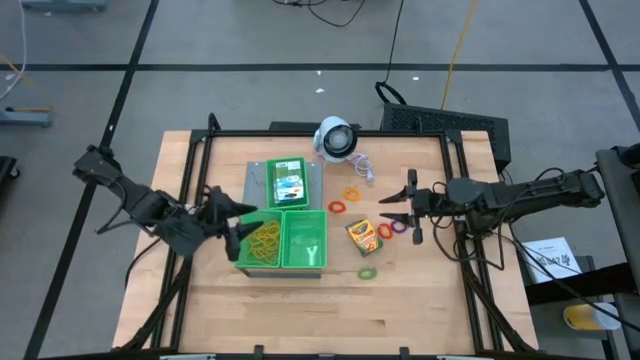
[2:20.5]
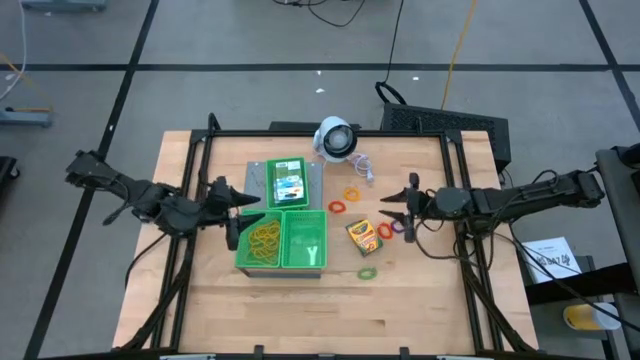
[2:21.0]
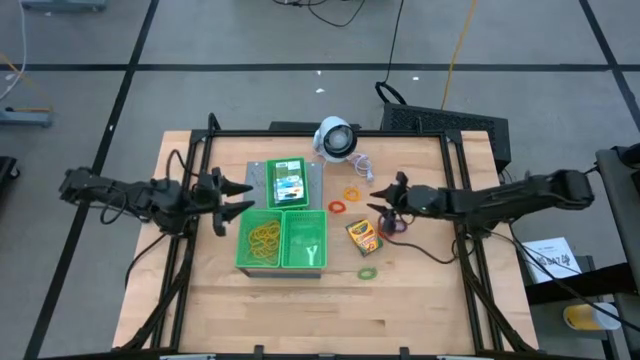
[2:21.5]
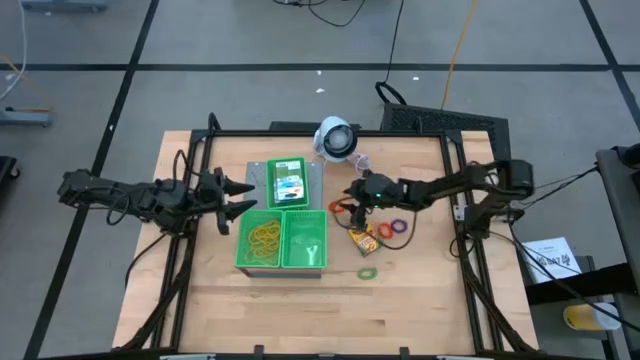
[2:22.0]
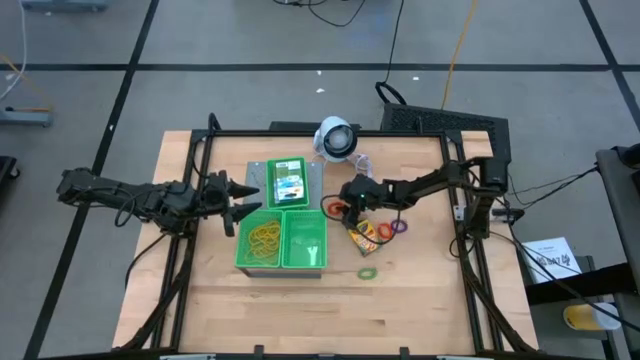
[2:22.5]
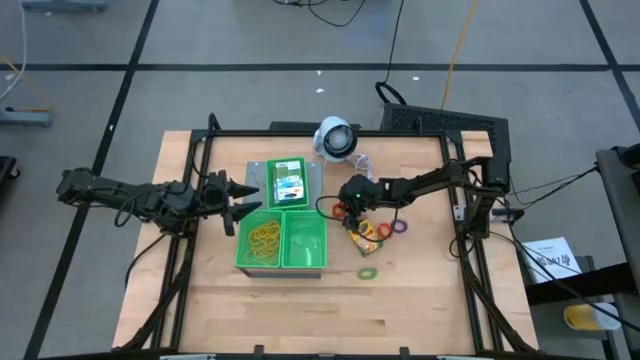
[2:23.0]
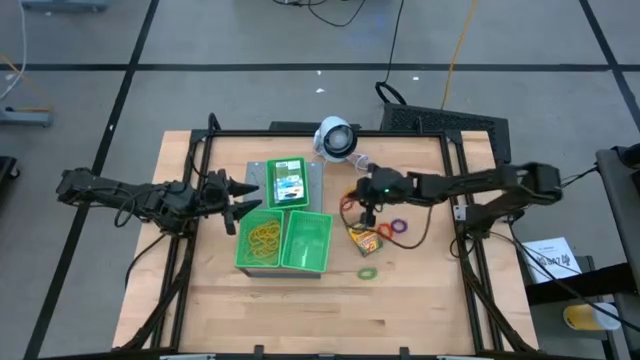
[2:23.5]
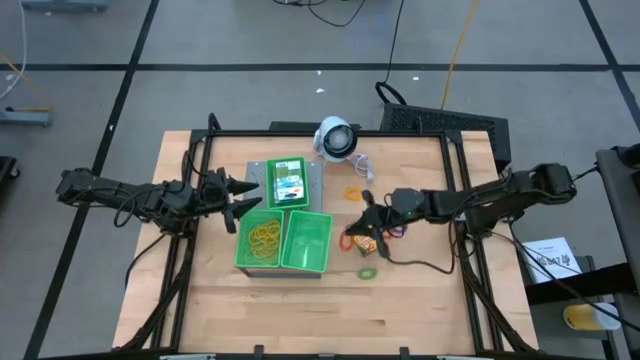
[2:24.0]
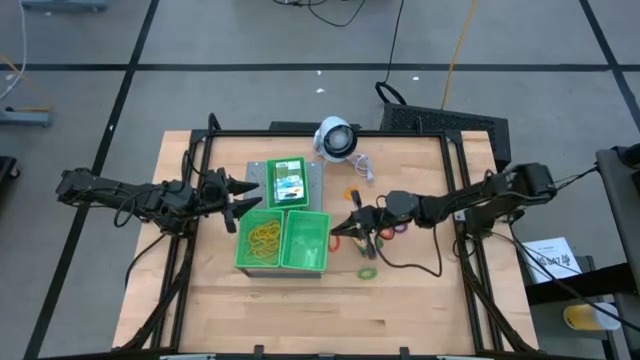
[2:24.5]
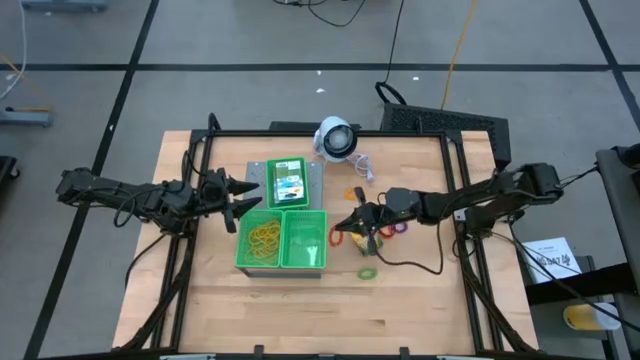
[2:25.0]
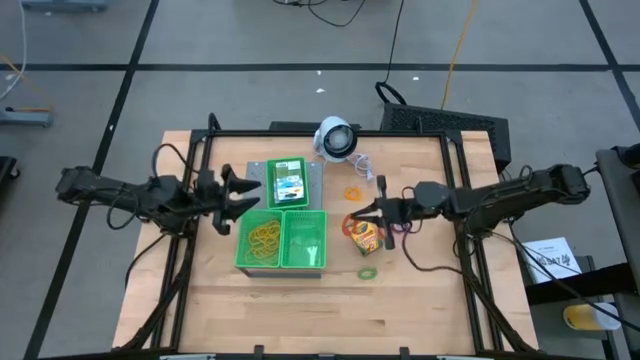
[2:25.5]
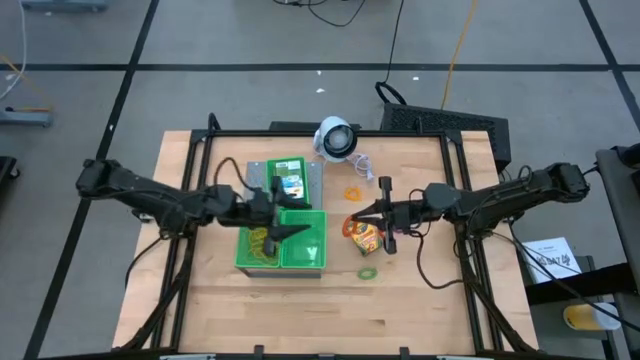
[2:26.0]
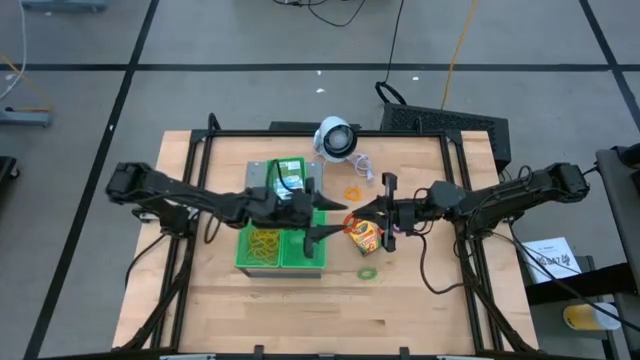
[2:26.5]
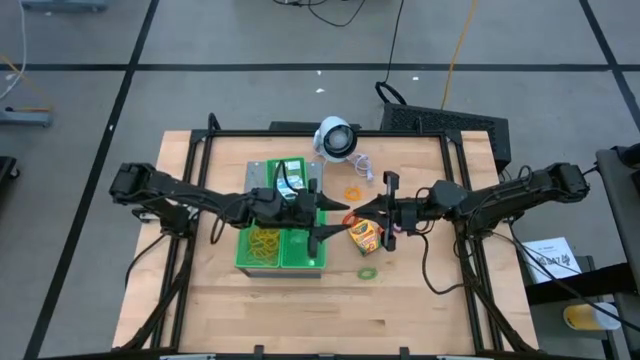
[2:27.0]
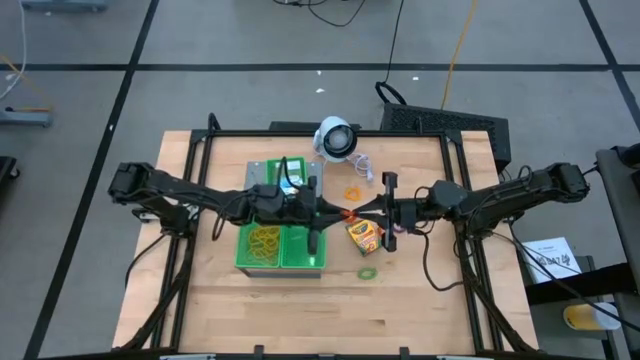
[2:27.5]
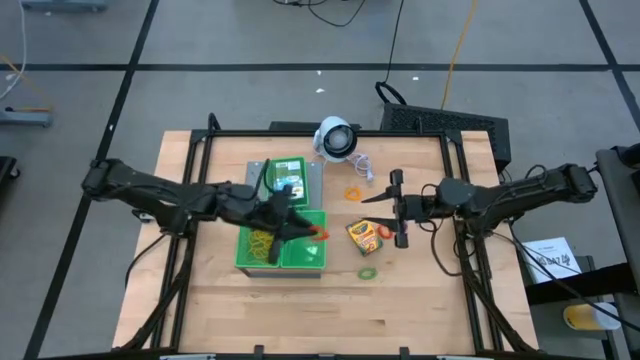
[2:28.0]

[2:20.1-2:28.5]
Task: Pick & Place Office Desk Supplies
Put the orange spring keychain into the bottom right basket on the shelf

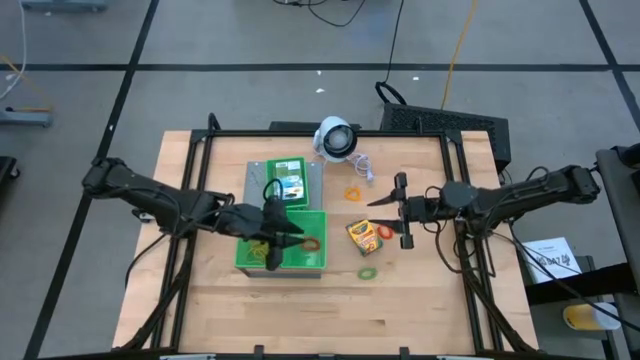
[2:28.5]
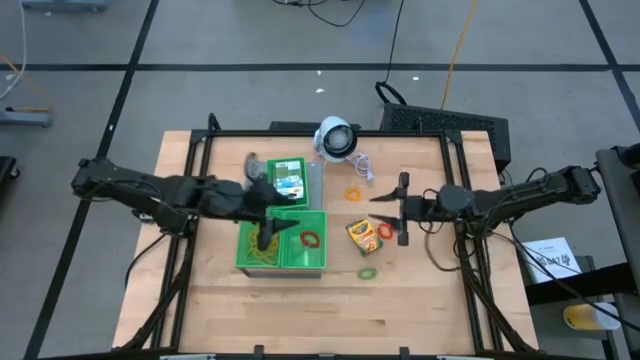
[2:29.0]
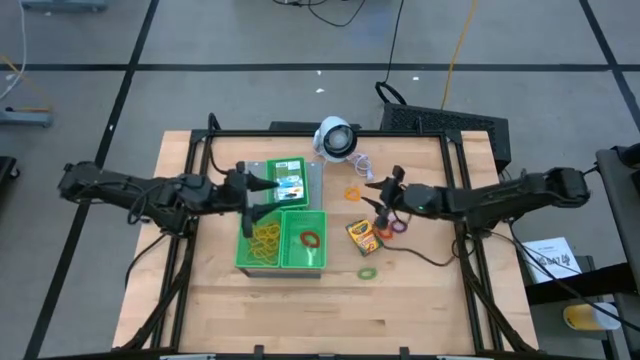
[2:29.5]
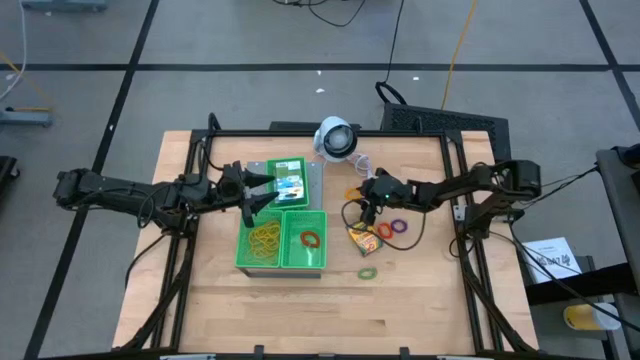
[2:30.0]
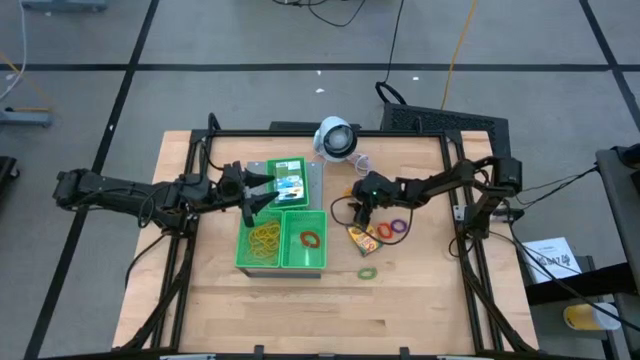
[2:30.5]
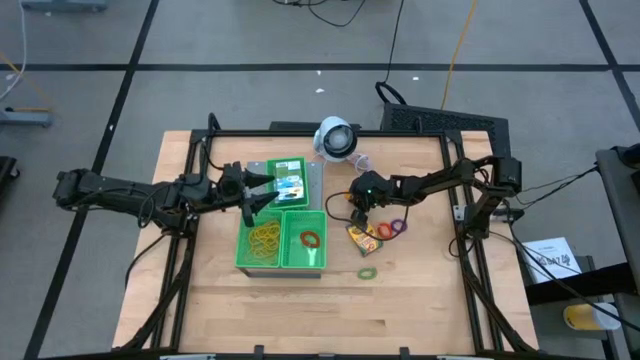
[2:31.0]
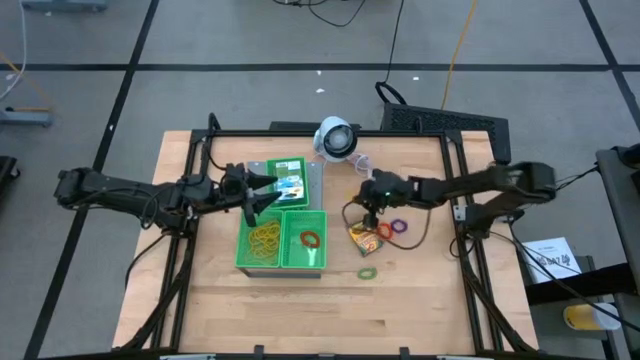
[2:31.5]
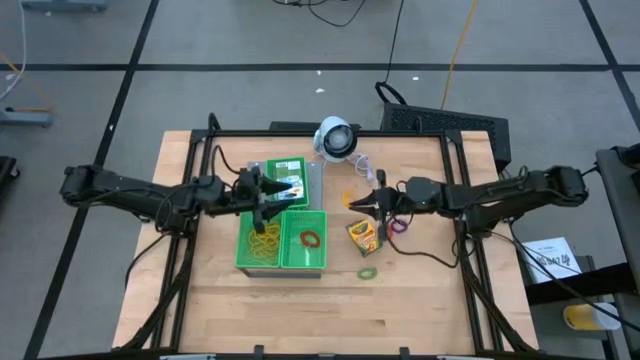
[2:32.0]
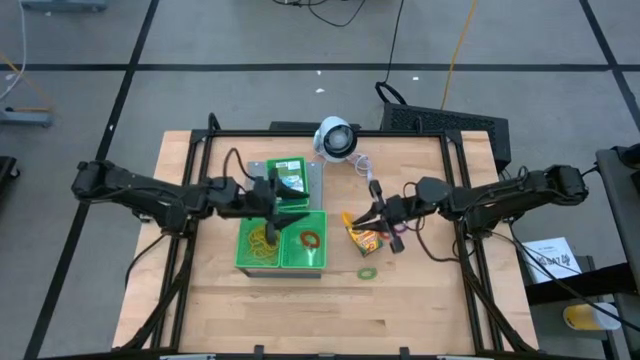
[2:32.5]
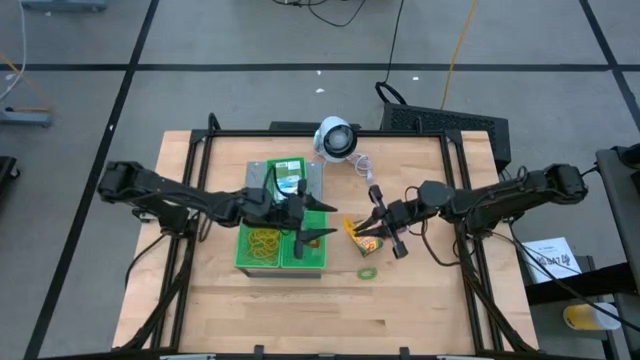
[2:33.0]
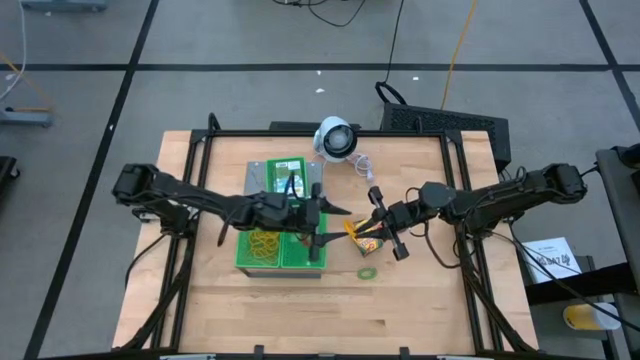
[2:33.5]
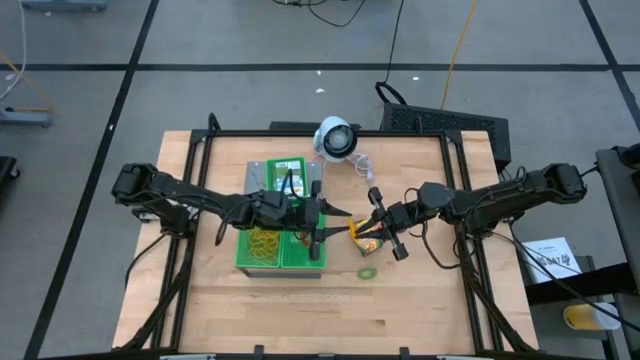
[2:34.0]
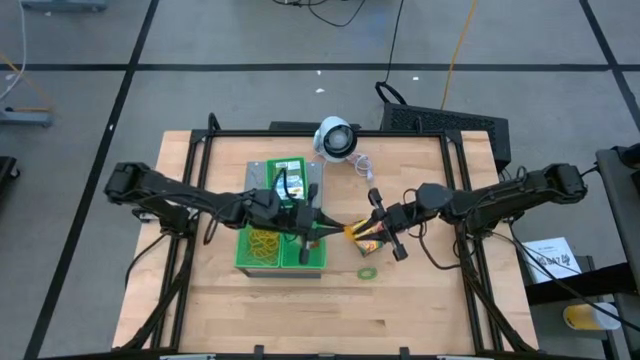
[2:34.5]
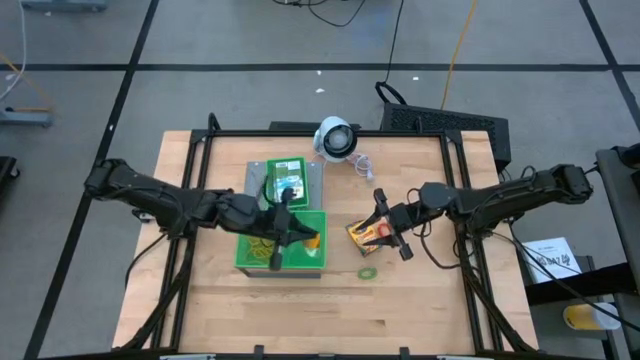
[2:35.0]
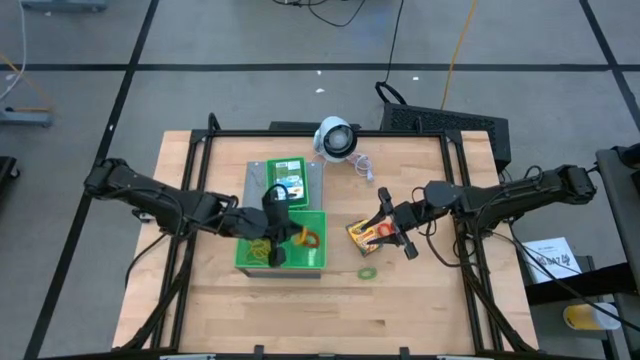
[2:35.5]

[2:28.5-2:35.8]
Put the yellow spring keychain into the bottom right basket on the shelf

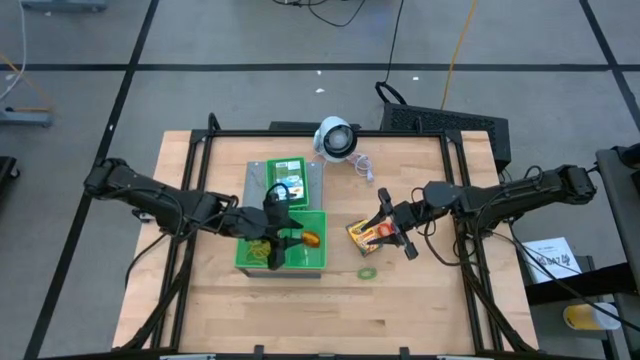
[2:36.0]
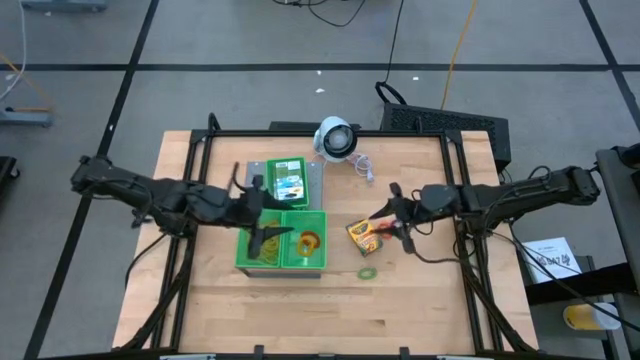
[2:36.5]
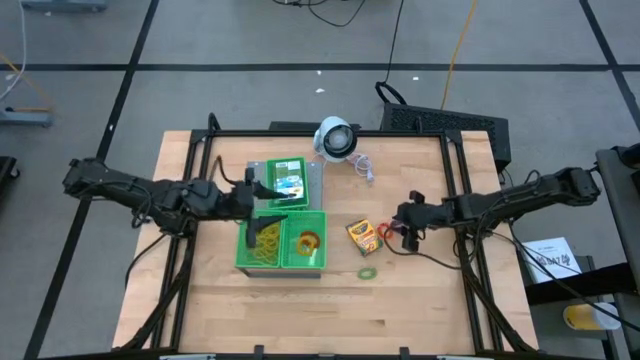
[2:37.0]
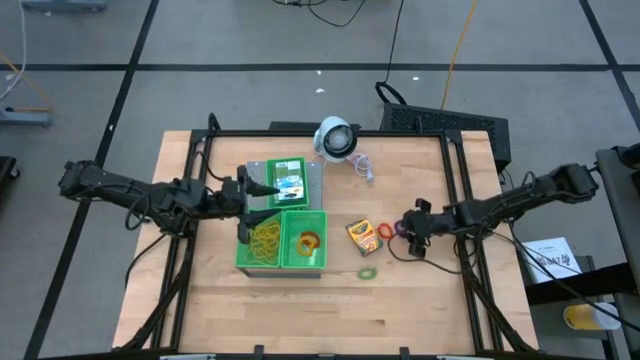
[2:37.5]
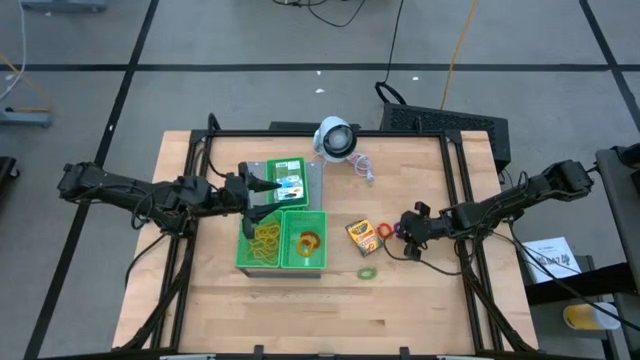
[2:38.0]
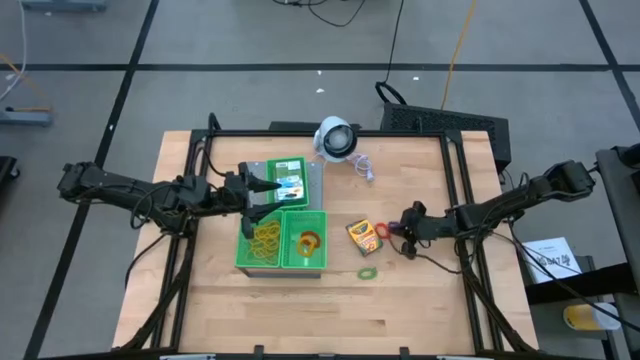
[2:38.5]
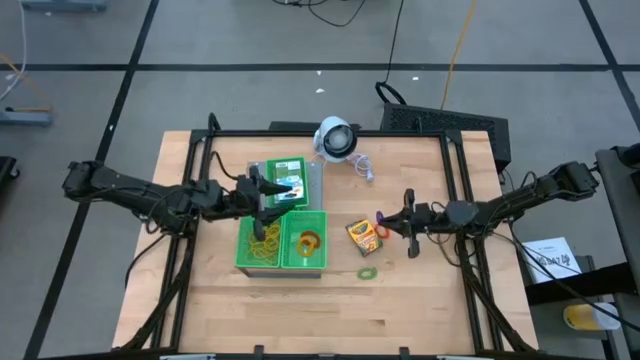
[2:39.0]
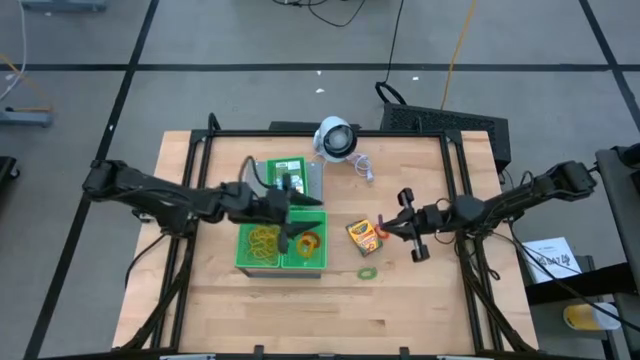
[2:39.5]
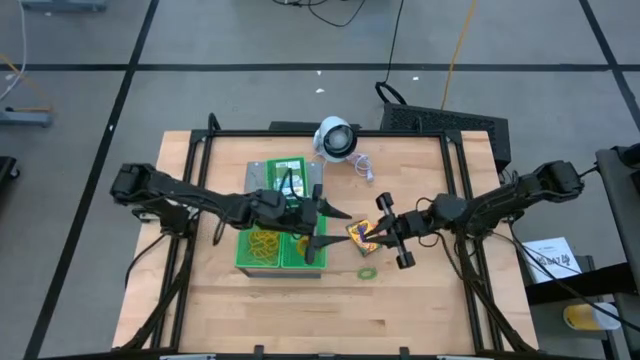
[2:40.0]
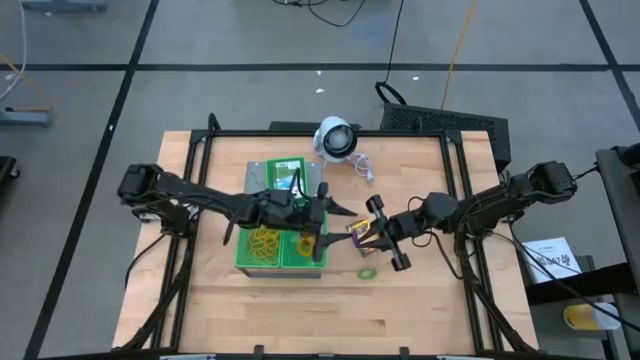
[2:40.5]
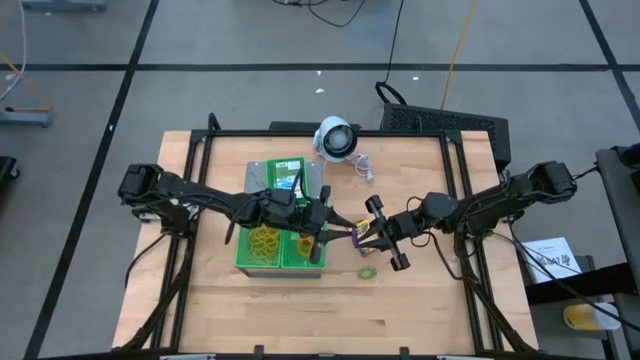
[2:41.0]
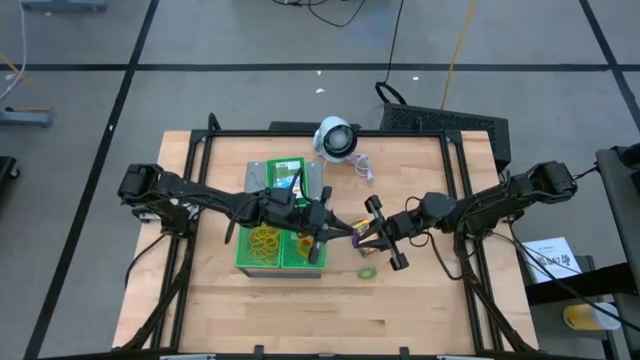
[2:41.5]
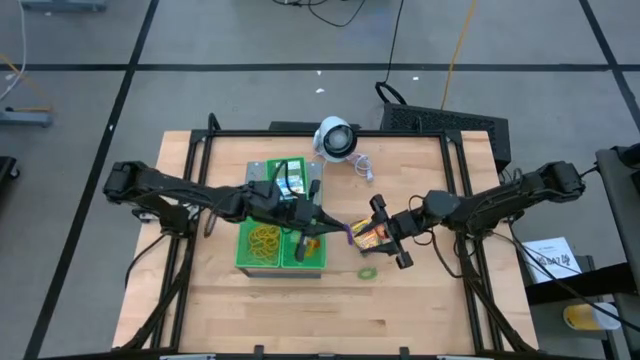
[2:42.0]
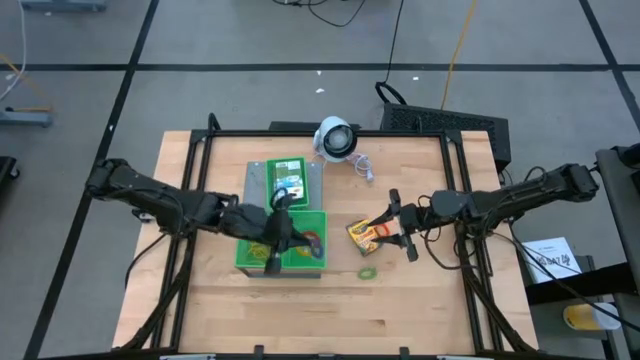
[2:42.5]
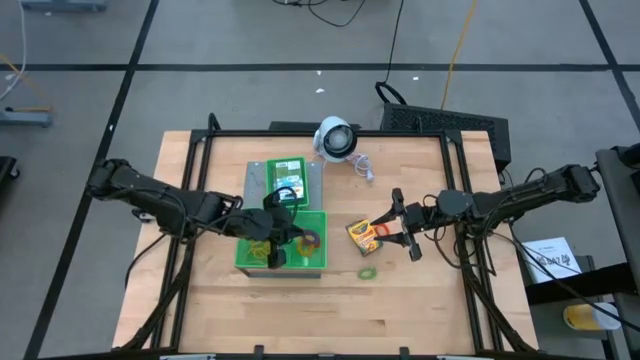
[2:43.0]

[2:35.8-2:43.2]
Put the violet spring keychain into the bottom right basket on the shelf
